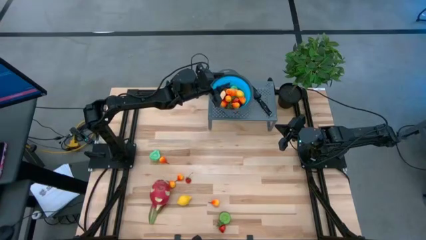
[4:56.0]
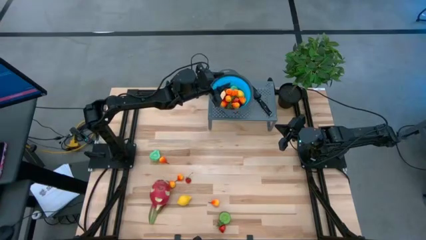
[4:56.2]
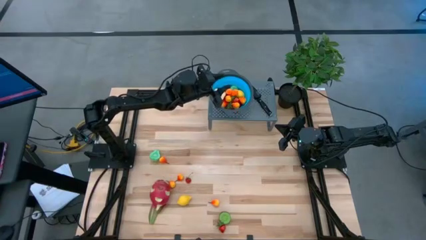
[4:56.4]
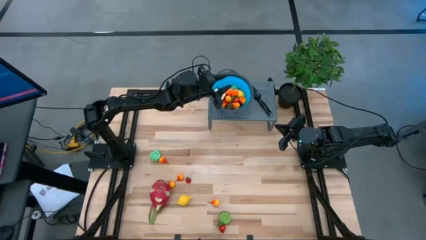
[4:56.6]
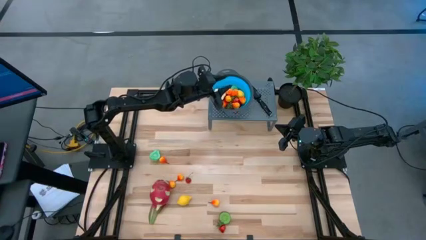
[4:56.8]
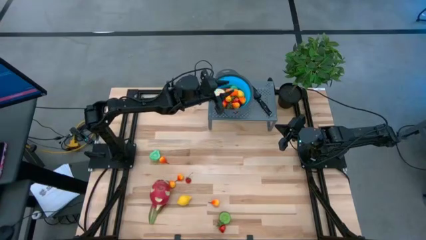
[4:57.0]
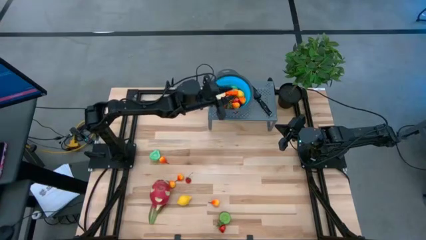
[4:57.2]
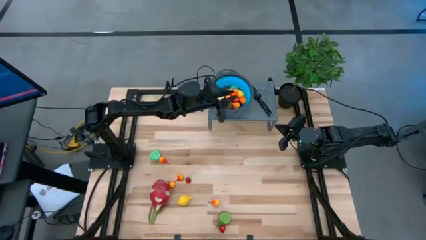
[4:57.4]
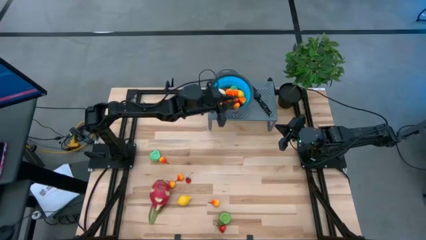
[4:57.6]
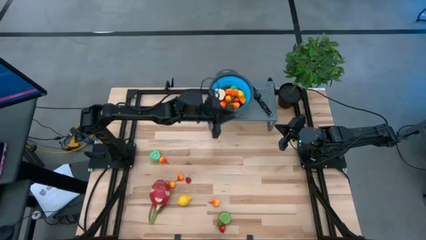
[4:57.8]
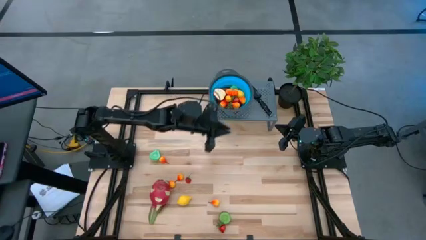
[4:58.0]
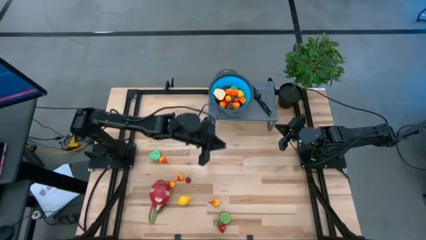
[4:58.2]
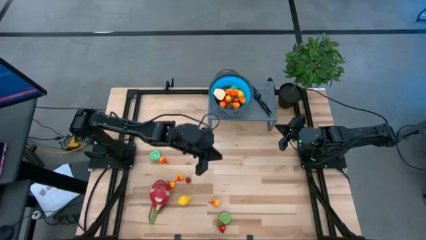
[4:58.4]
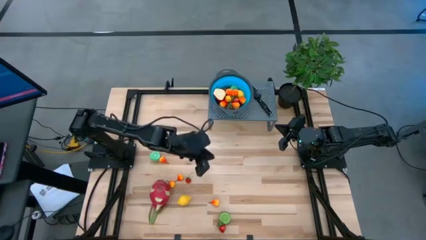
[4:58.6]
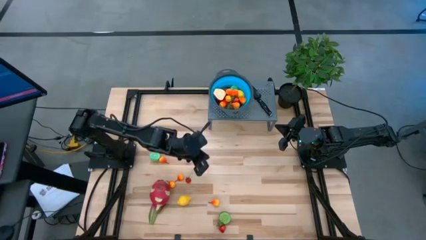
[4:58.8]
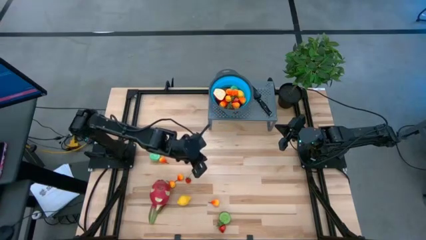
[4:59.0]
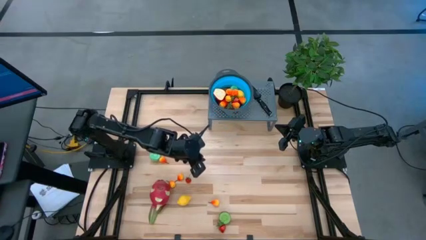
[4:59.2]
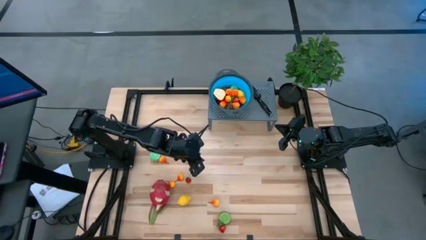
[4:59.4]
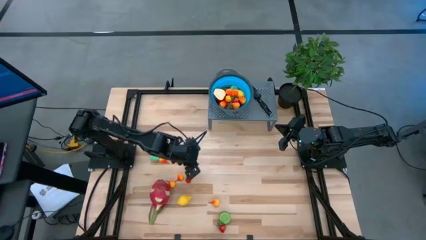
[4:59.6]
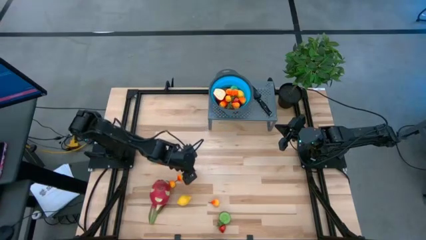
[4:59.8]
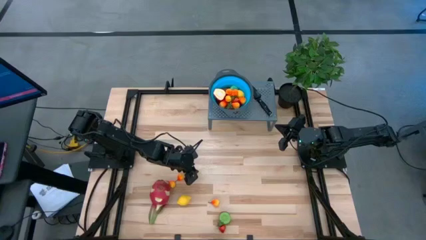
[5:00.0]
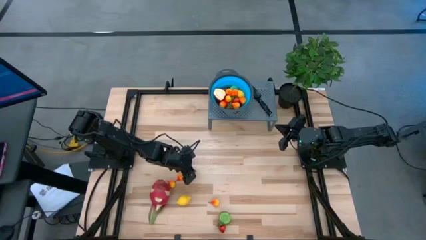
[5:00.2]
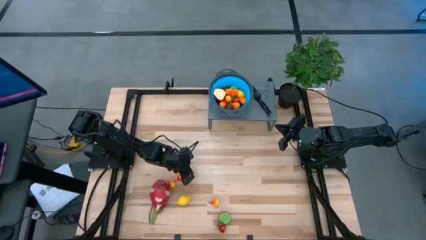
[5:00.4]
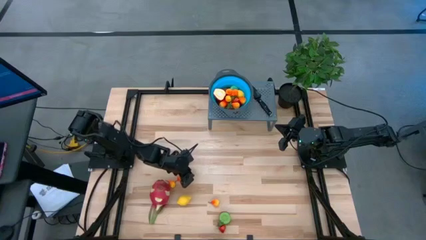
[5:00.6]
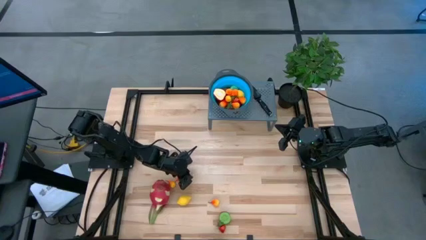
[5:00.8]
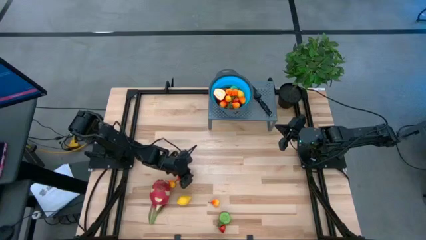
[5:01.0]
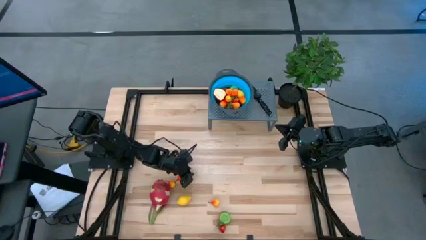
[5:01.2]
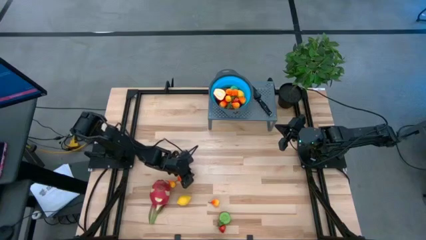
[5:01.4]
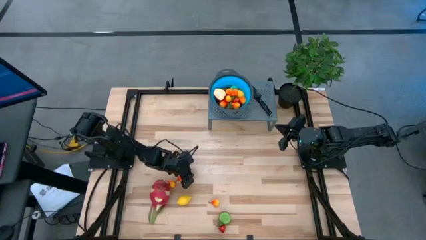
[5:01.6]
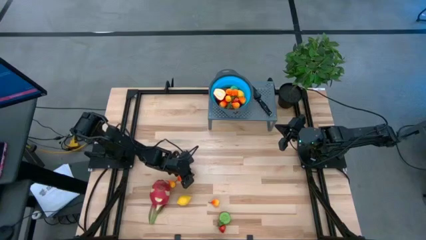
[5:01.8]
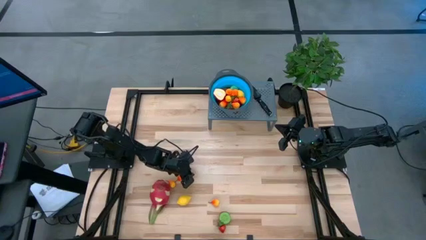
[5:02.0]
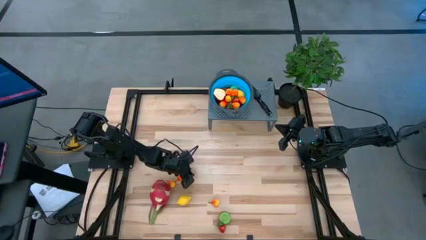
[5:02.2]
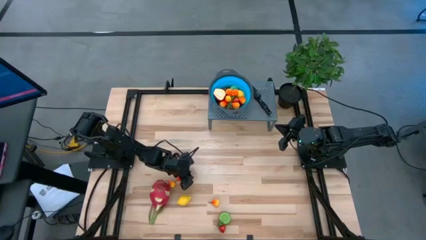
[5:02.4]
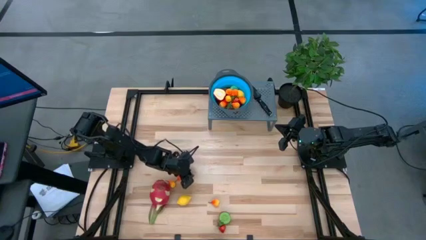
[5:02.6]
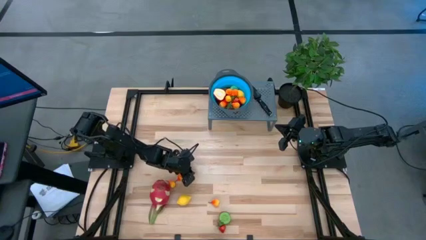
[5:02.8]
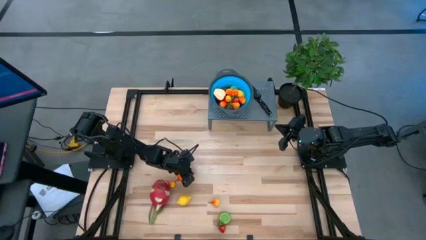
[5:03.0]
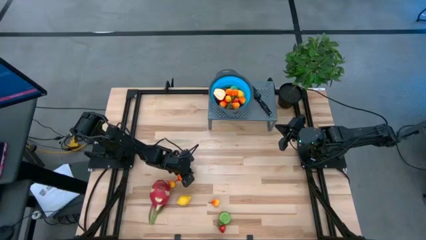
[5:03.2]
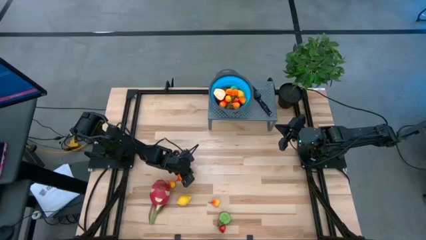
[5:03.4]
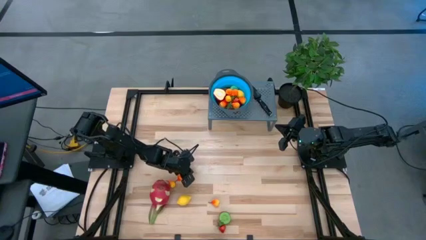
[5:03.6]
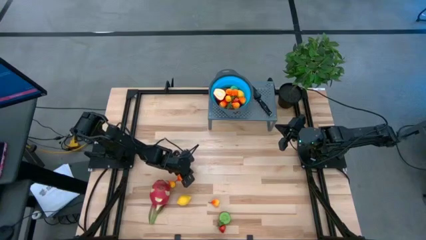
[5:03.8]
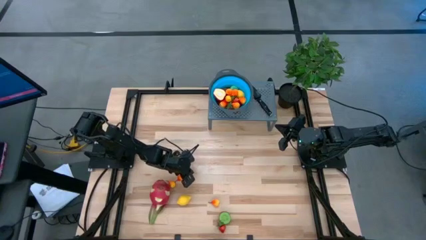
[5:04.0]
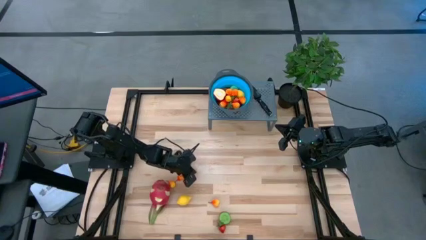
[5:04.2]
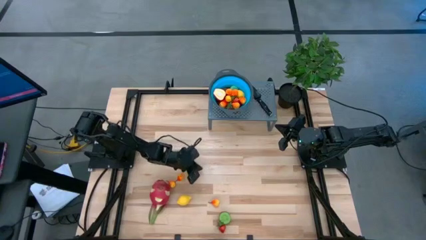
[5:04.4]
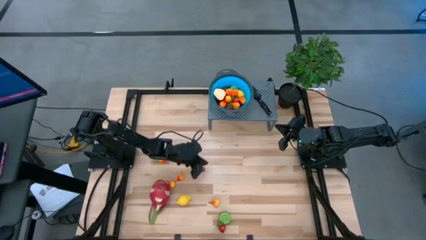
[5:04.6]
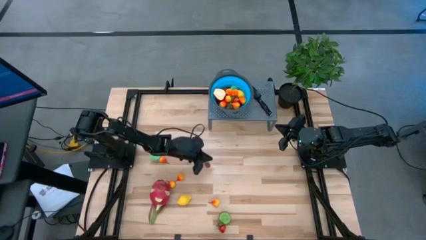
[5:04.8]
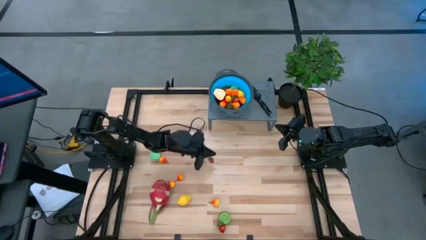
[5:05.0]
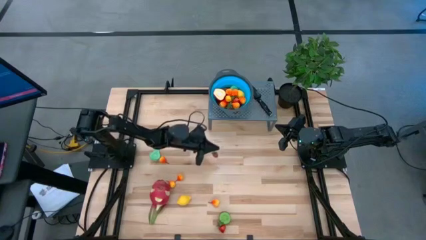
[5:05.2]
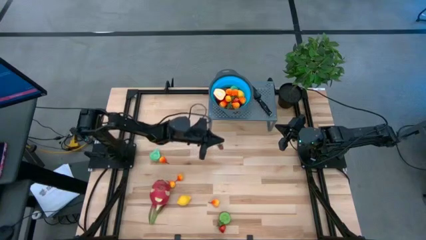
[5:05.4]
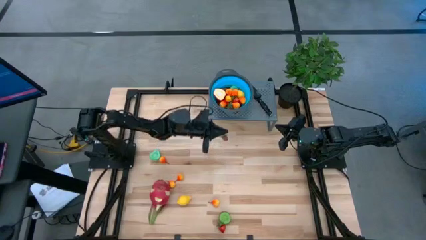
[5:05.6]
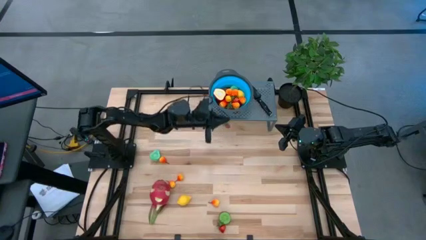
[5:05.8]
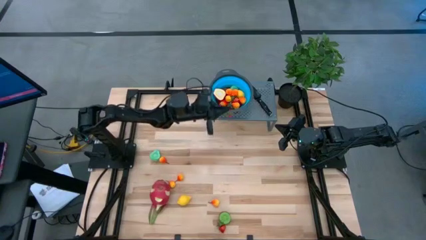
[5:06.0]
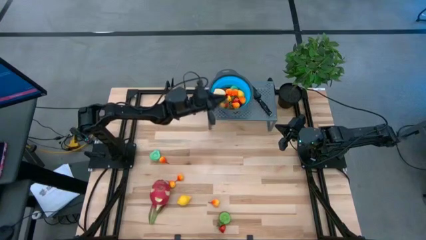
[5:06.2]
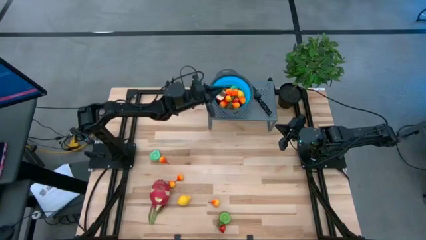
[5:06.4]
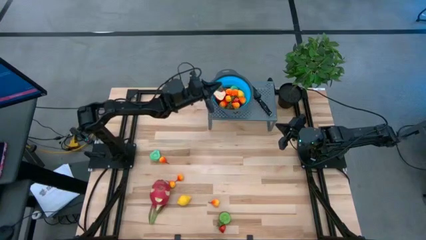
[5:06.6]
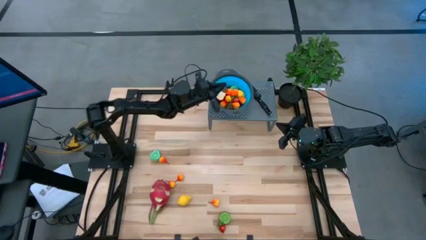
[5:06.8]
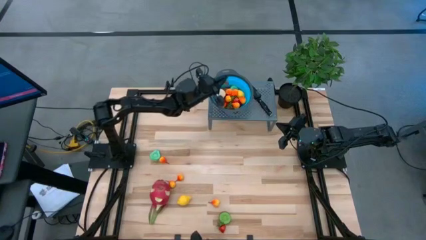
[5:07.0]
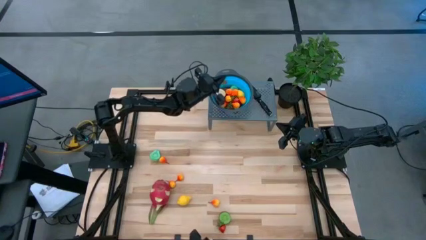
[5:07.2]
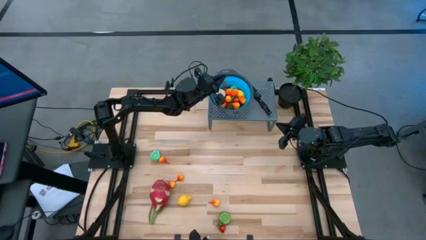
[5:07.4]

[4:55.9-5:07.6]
Task: Pick & Place Fruit
Put the top strawberry into the strainer bowl

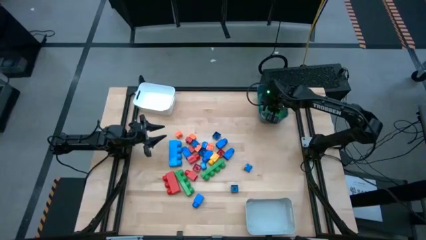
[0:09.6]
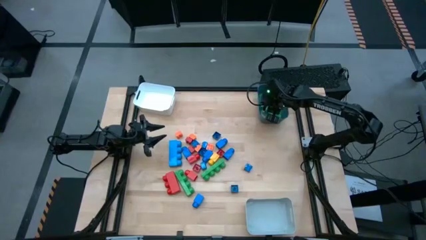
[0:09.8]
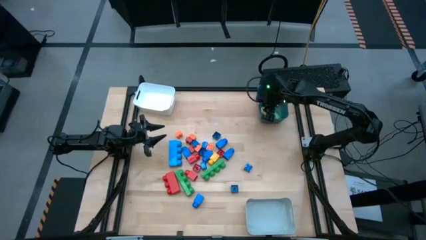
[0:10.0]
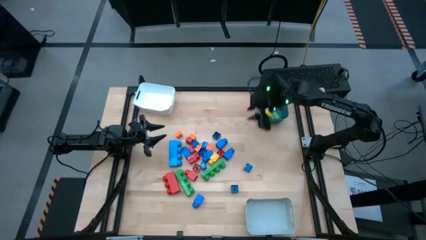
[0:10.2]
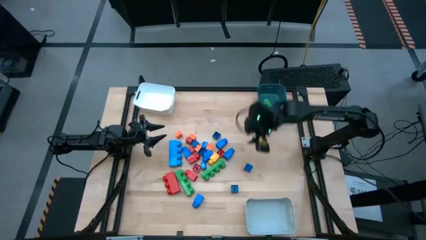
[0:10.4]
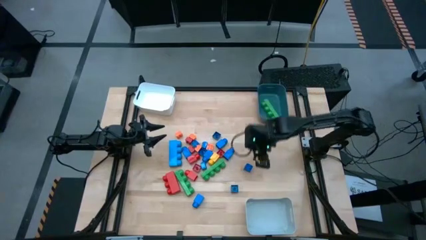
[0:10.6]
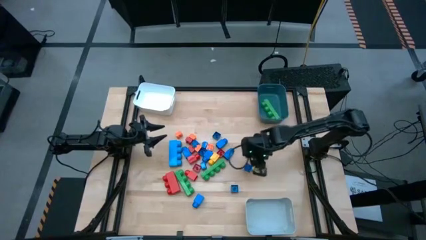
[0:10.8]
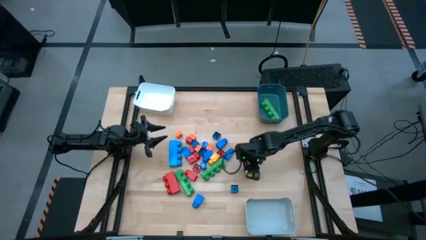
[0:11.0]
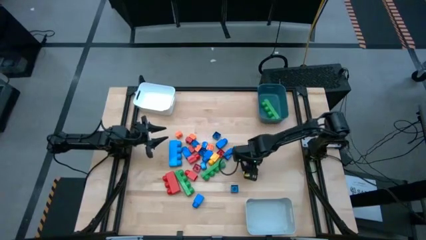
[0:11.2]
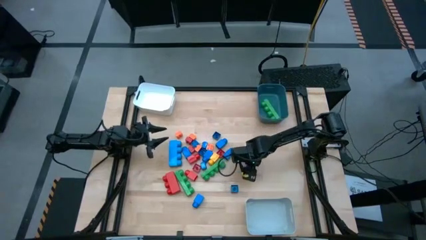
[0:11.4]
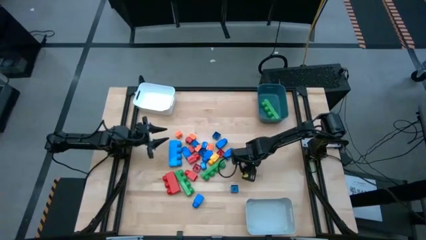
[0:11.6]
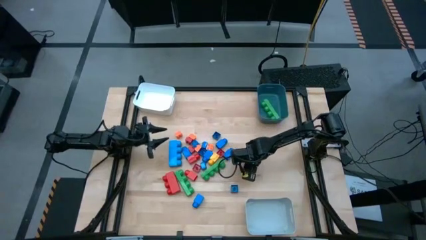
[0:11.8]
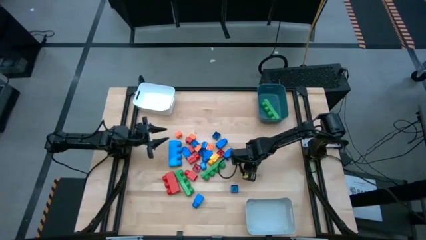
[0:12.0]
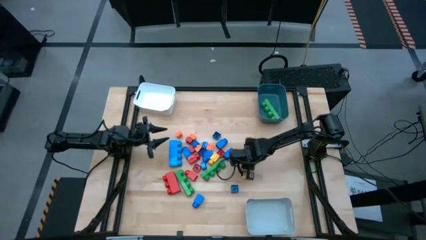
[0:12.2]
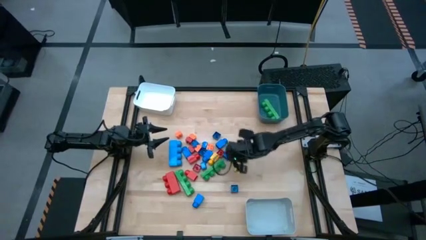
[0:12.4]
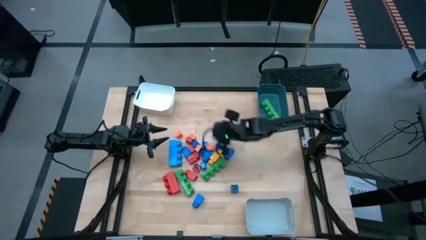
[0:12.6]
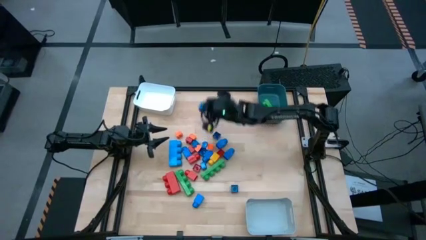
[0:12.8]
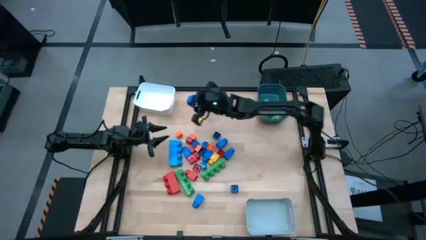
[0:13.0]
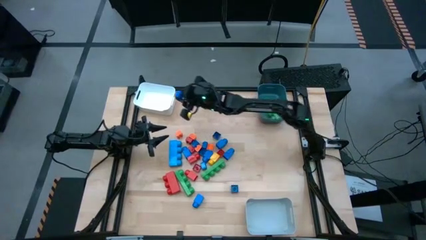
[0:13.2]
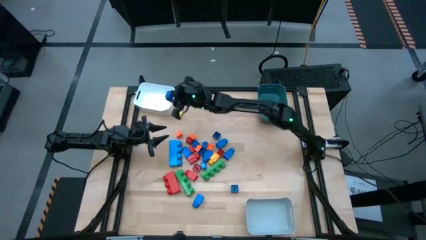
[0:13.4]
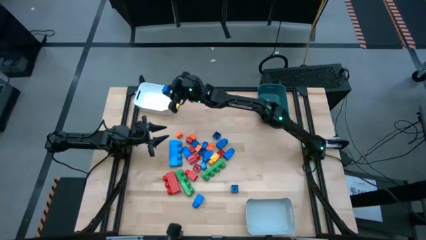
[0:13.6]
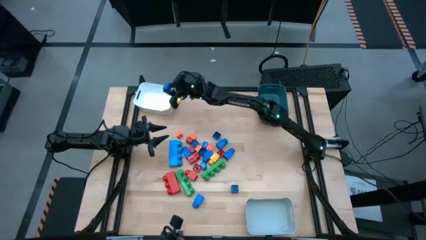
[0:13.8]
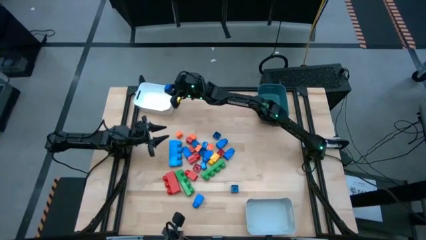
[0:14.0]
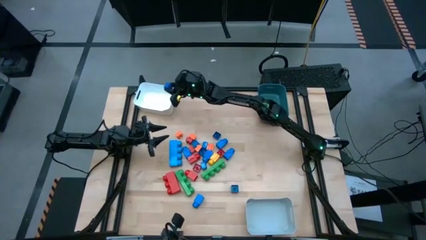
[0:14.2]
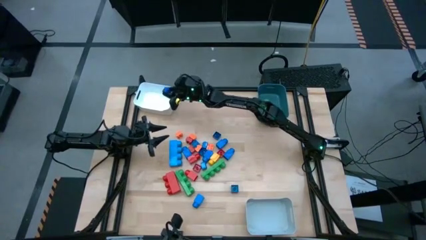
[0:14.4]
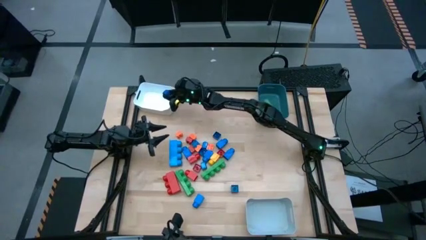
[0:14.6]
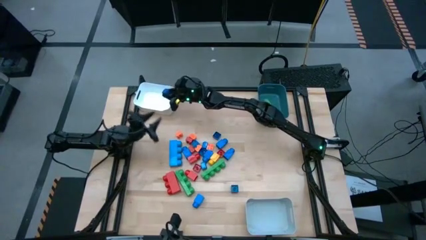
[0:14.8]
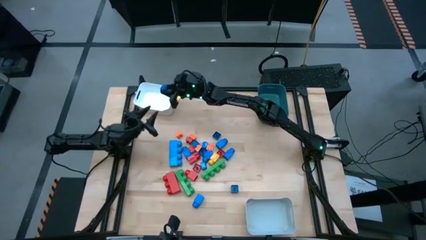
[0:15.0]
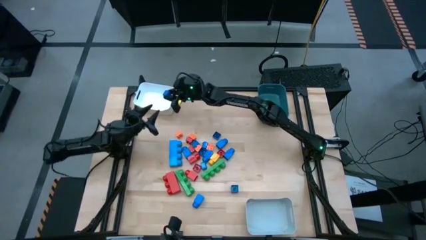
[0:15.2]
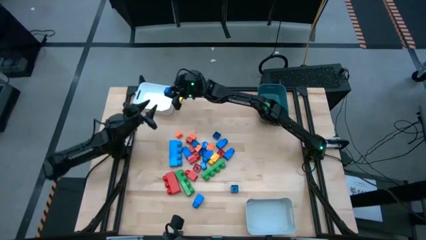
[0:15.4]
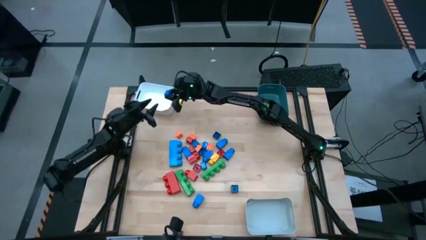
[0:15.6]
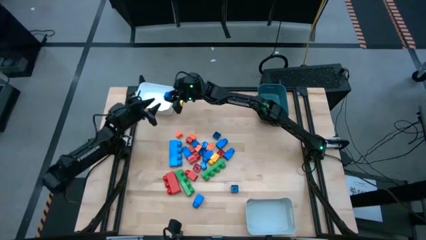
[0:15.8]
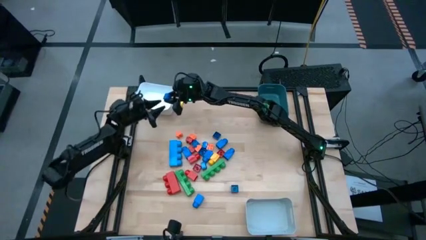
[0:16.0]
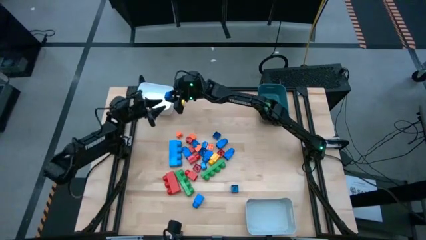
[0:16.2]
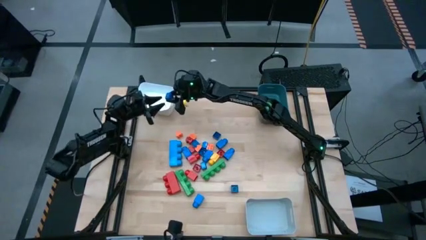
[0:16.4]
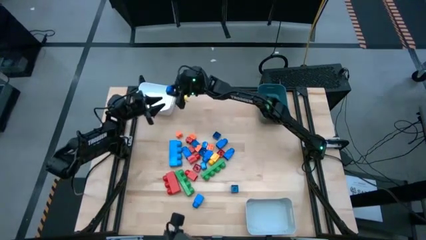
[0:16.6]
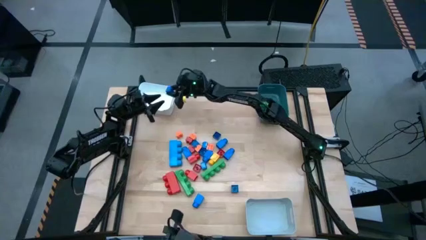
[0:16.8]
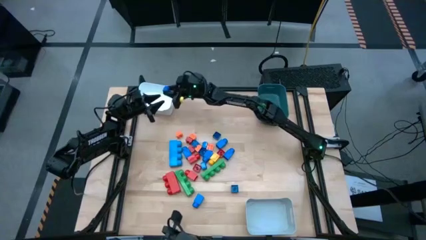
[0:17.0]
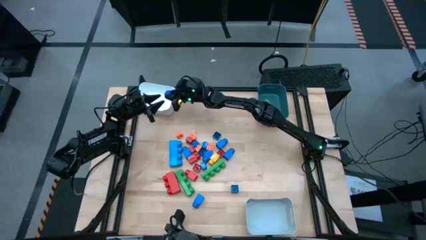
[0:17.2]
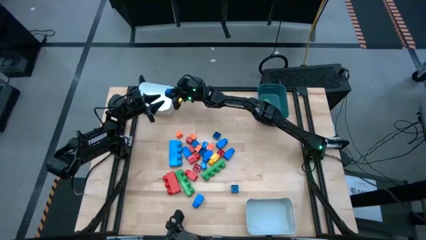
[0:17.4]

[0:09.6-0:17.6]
Task: Sort blocks by size
Put the small 4 stud blue game piece into the white bin
